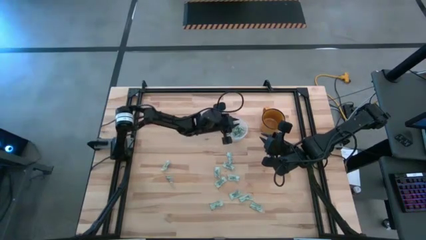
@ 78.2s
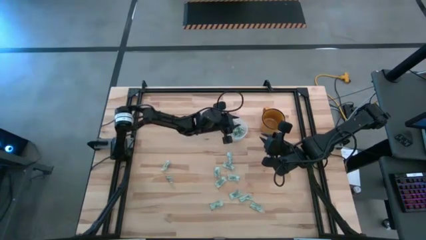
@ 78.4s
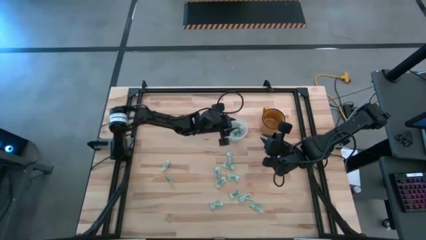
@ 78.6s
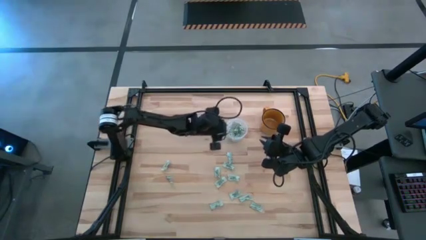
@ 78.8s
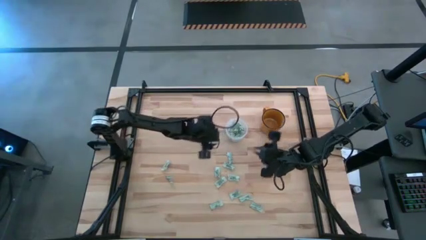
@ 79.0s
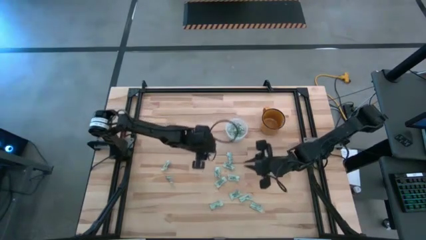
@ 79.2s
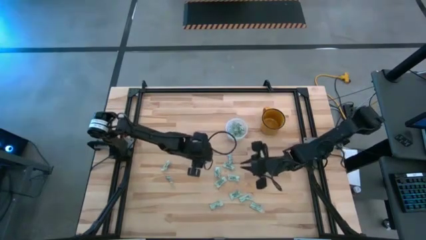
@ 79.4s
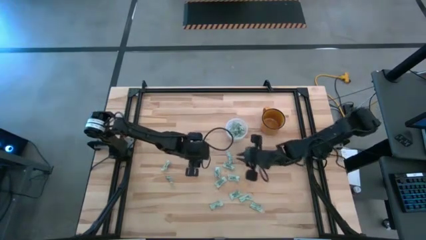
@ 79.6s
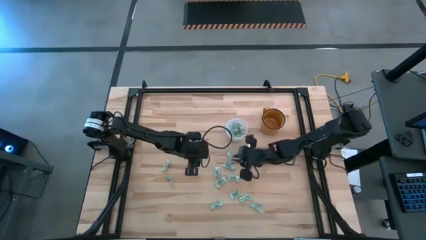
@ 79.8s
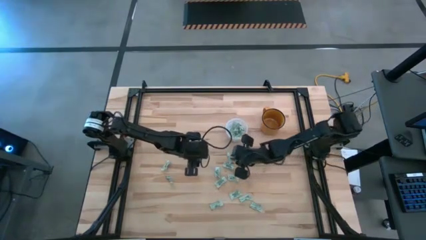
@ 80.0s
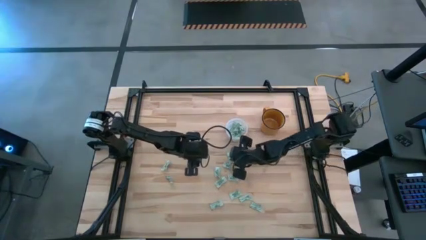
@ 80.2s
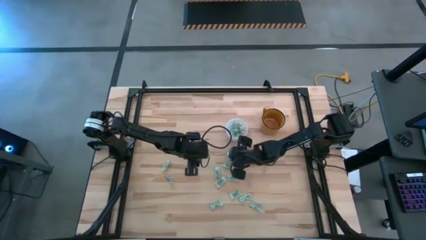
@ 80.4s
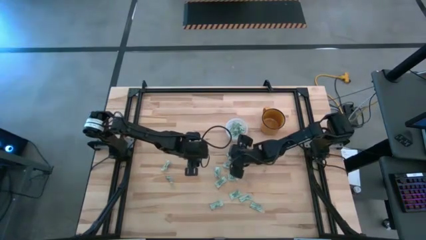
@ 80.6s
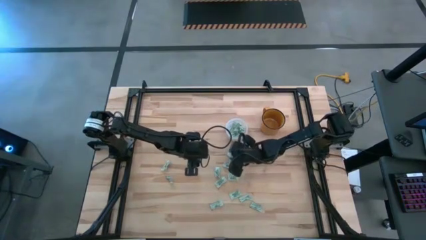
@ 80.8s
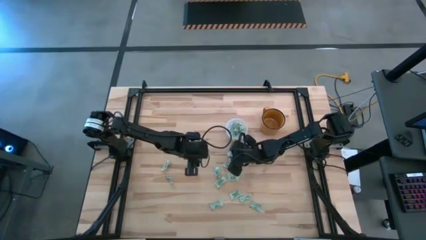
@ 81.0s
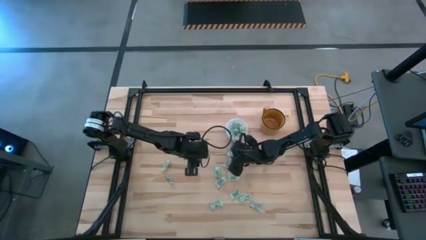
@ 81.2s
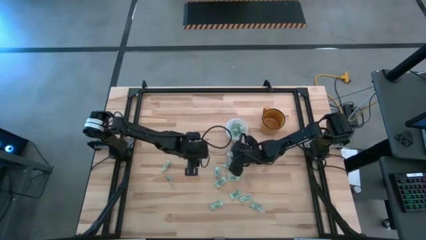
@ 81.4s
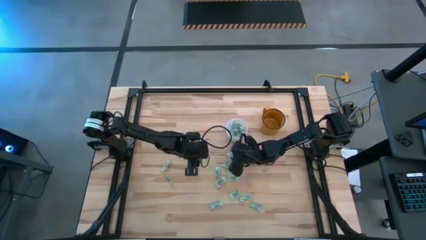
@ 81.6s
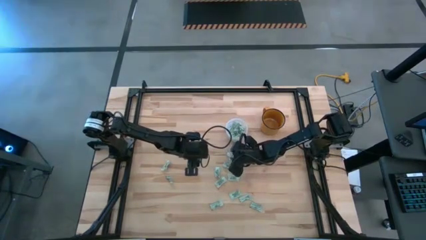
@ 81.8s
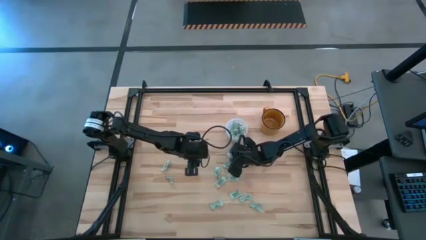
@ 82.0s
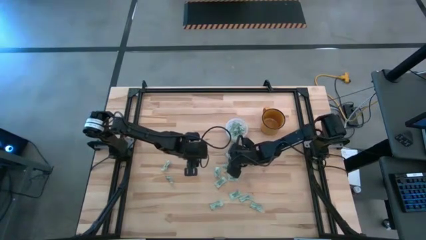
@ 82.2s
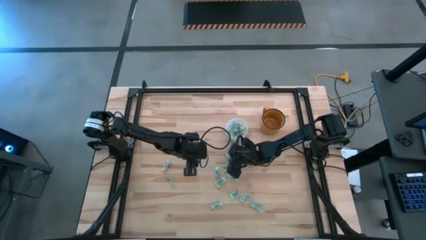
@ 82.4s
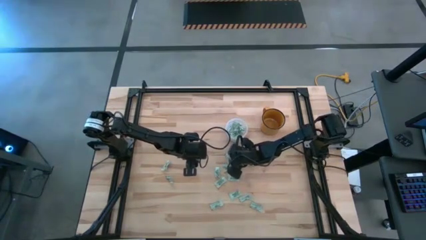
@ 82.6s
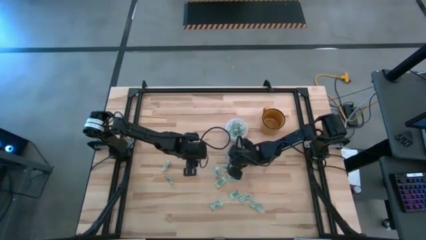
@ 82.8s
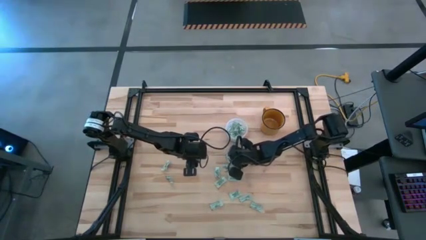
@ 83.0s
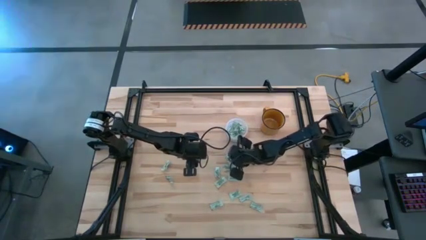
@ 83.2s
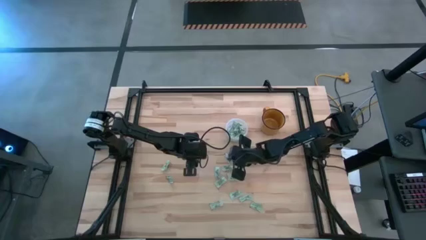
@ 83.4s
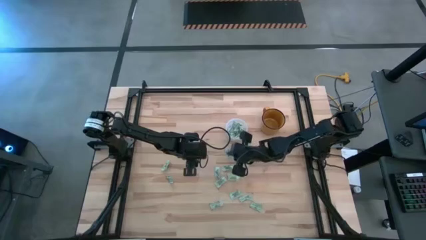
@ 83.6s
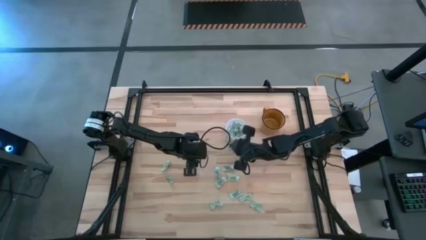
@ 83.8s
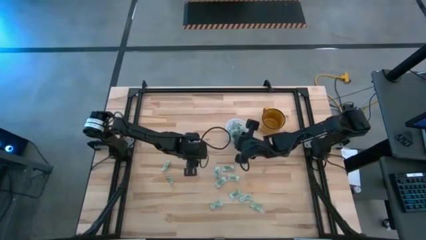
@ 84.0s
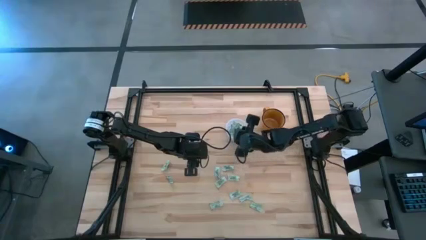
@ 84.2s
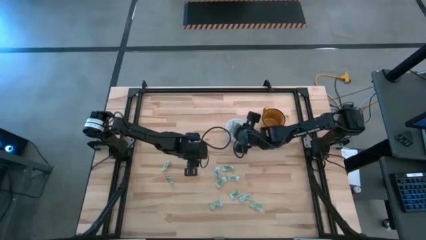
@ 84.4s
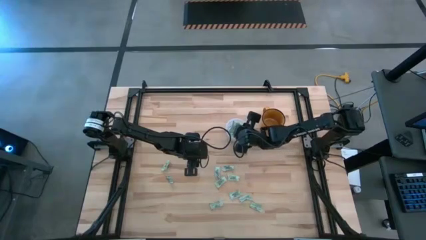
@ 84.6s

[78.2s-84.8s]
Task: Pick and place Stevia / Truvia into bins
Put the green stevia packet into the transparent bin

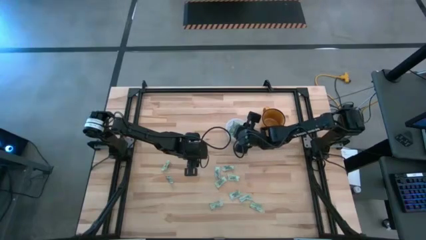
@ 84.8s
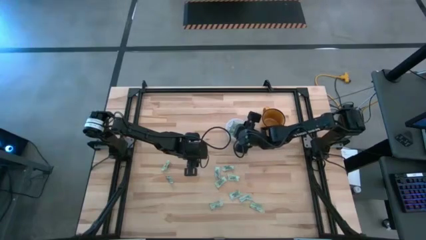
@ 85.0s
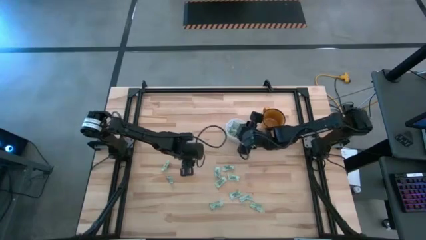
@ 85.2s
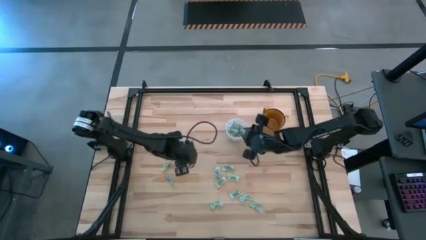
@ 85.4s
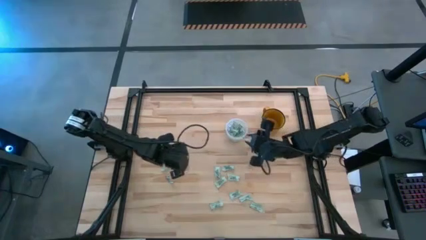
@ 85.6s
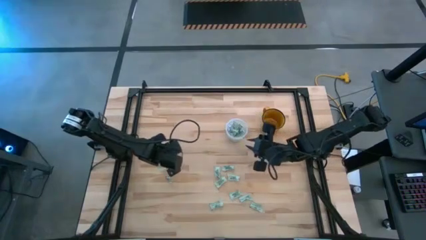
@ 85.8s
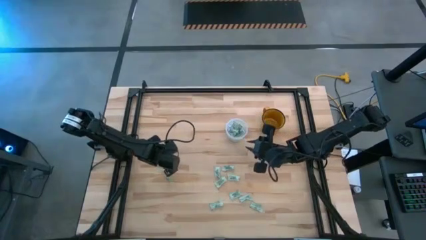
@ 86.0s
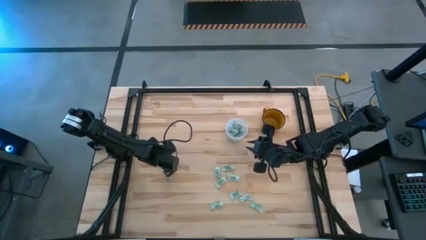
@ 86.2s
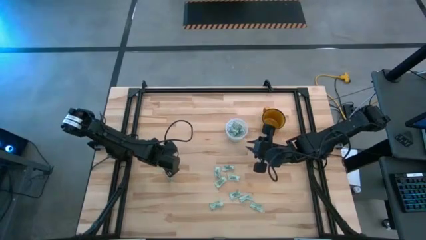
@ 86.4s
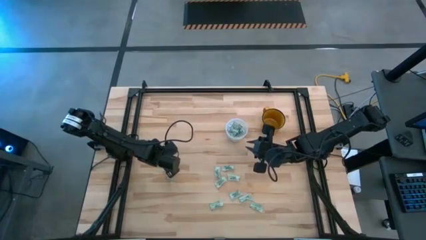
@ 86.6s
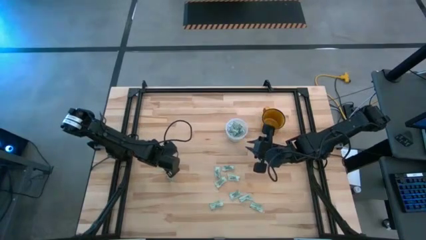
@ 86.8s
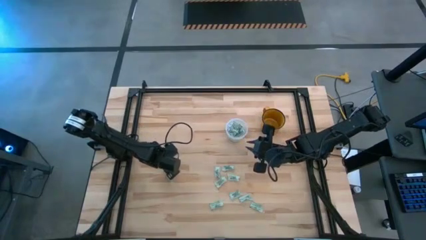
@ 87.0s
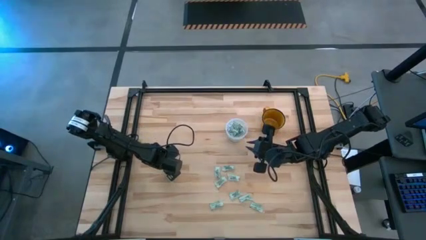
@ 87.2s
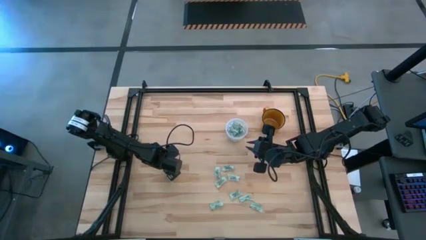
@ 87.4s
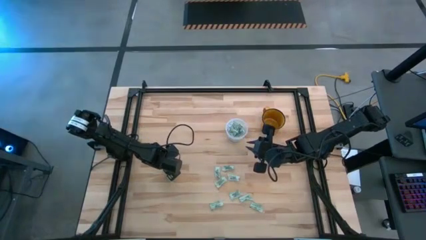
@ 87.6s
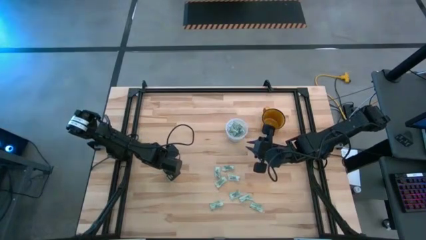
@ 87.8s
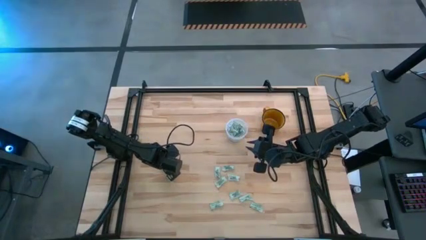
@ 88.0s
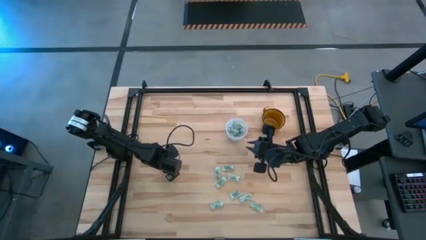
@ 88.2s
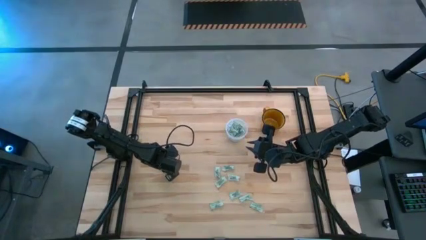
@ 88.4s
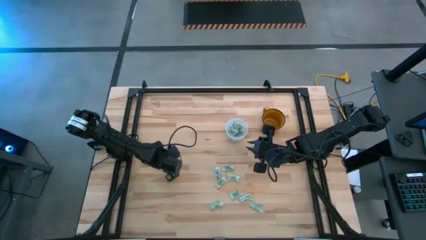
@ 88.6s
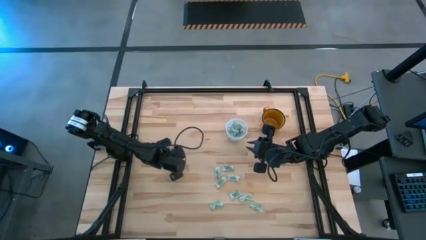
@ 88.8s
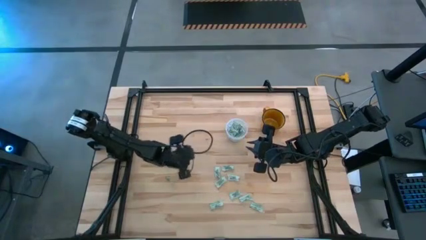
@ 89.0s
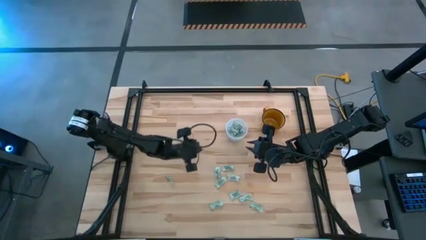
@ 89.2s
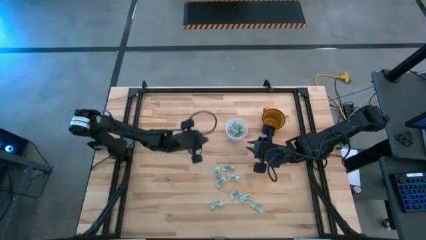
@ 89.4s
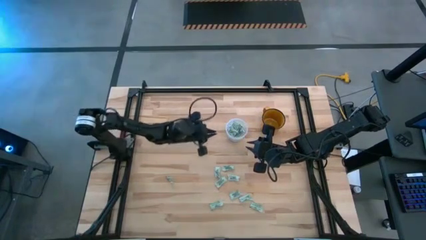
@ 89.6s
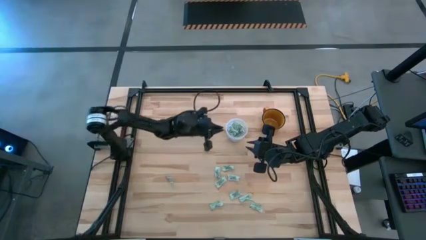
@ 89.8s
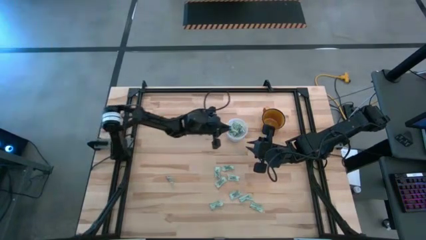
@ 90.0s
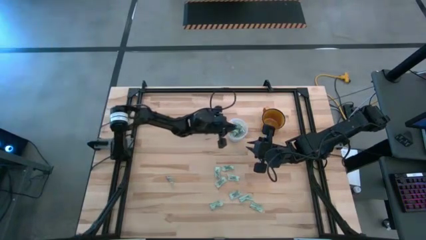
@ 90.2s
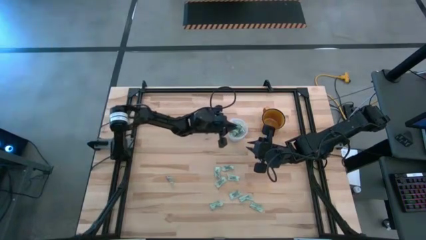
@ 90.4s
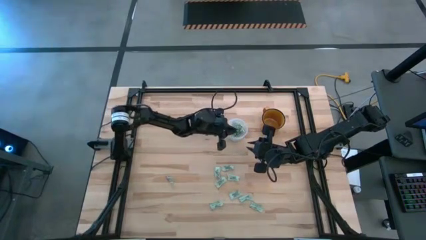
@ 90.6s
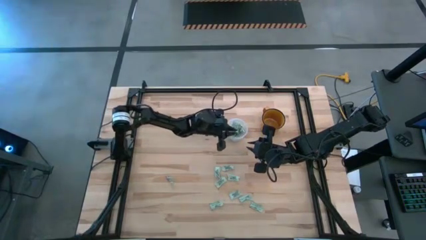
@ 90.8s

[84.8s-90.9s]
Put the green stevia packet into the transparent bin

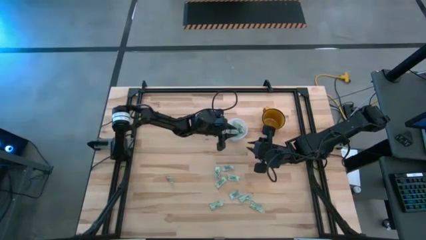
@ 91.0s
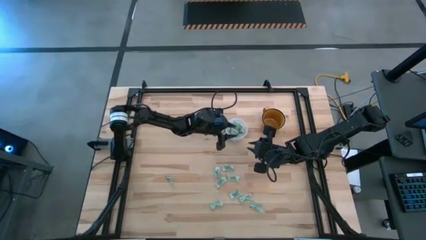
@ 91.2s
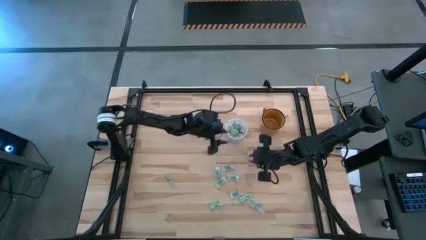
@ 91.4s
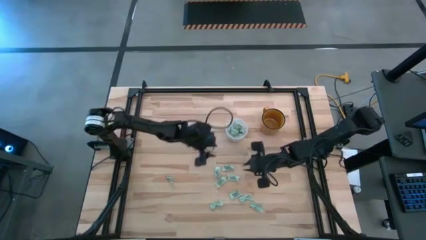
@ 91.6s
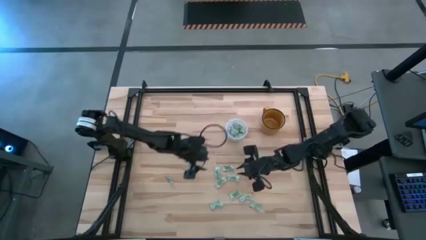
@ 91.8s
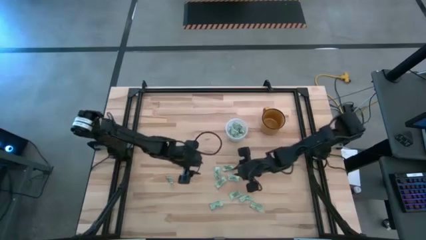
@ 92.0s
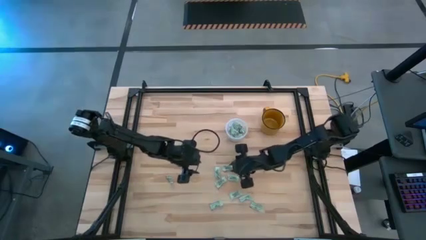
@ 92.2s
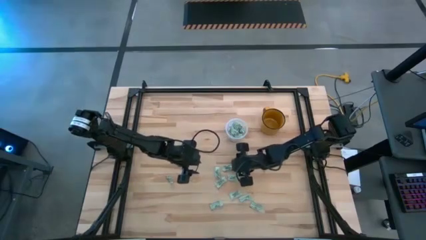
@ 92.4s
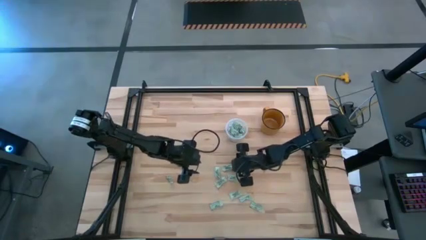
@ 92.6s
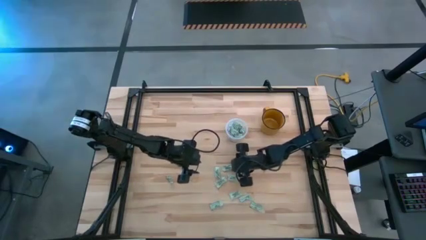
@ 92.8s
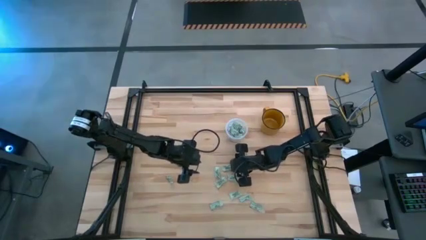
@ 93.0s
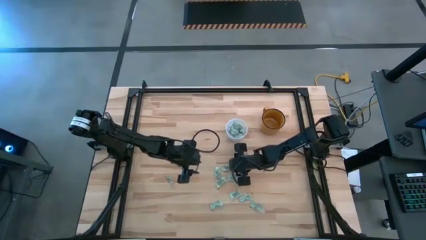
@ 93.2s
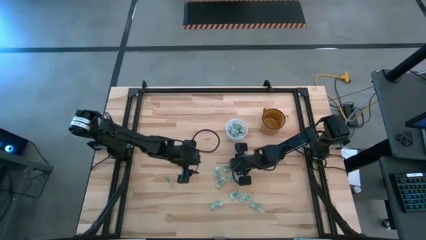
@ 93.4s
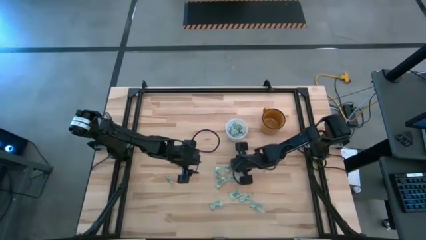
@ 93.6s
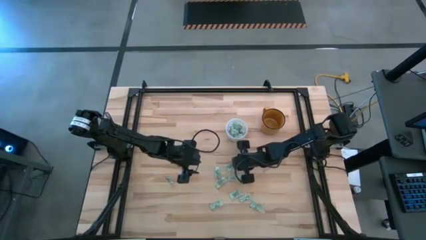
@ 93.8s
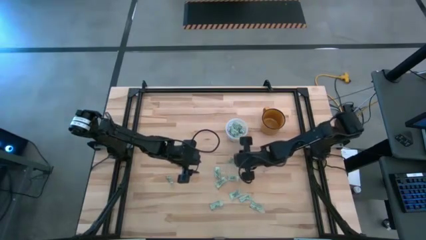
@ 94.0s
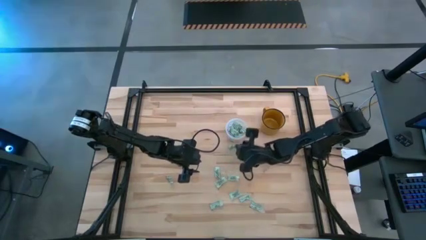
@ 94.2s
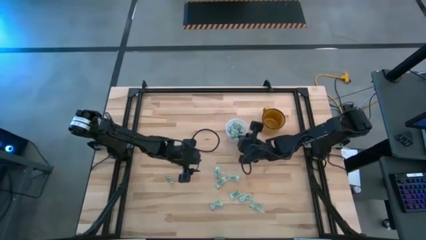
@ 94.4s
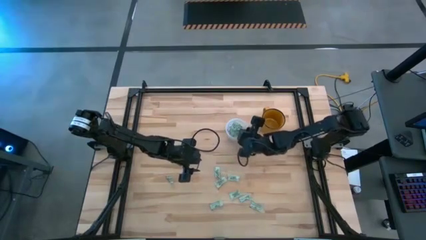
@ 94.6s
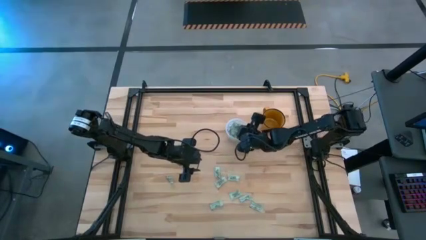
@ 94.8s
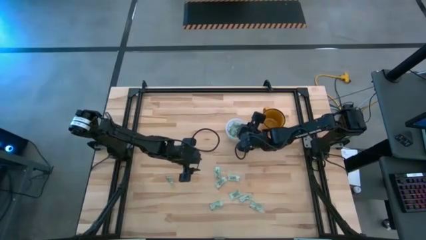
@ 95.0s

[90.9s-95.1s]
Put the green stevia packet into the transparent bin
